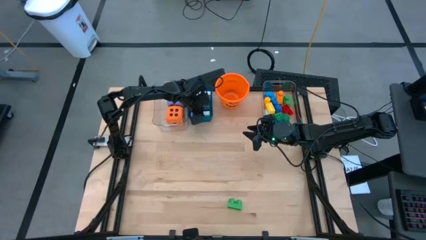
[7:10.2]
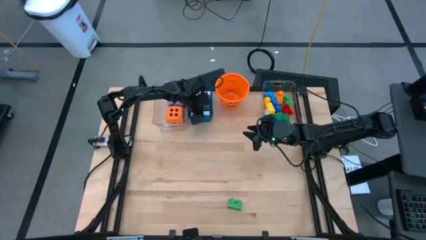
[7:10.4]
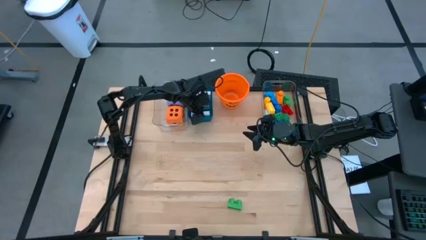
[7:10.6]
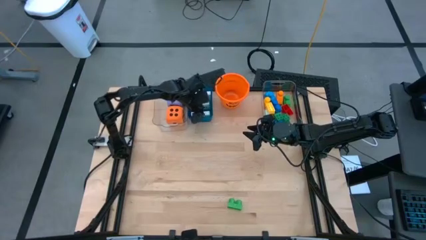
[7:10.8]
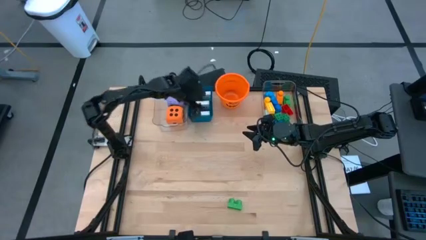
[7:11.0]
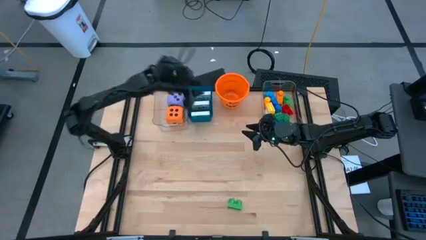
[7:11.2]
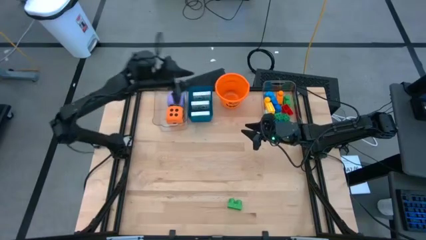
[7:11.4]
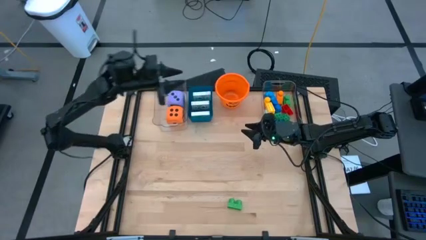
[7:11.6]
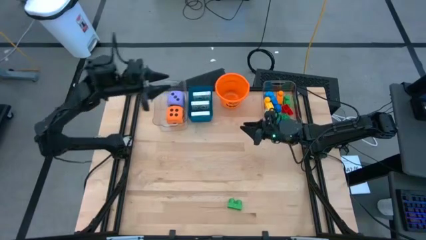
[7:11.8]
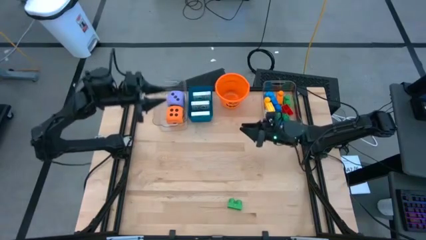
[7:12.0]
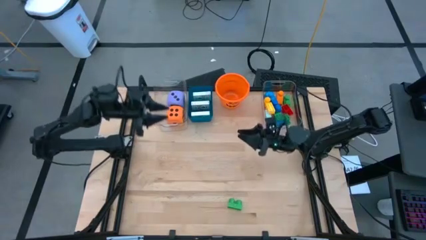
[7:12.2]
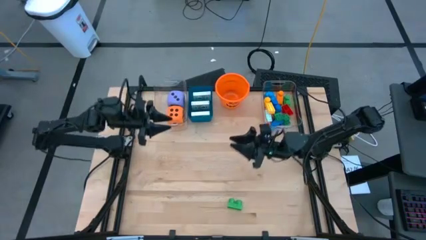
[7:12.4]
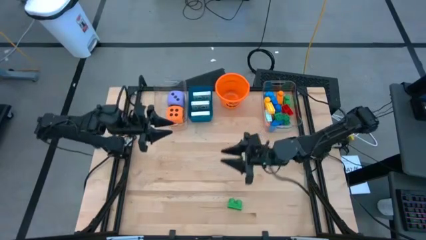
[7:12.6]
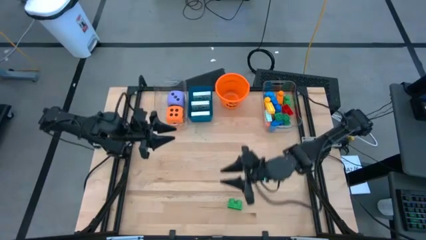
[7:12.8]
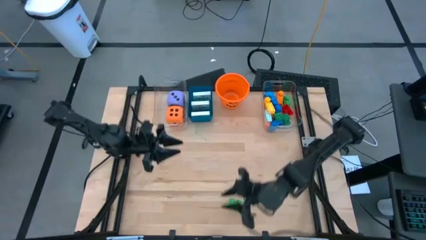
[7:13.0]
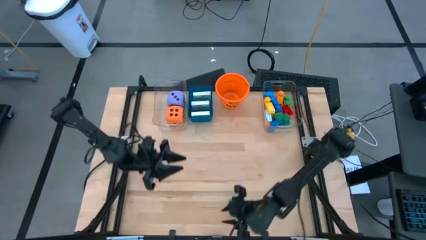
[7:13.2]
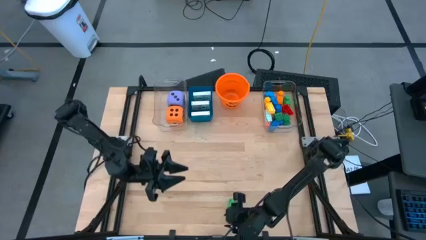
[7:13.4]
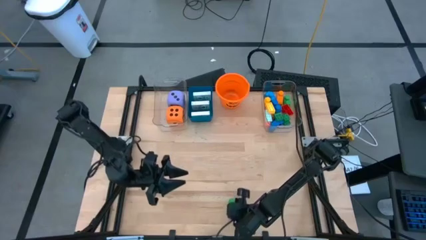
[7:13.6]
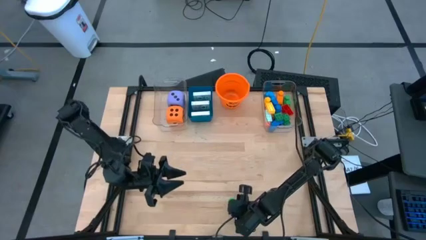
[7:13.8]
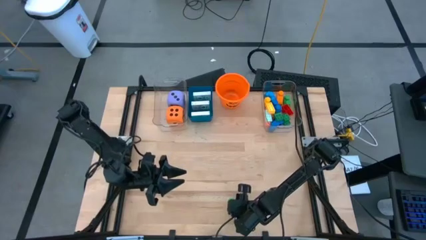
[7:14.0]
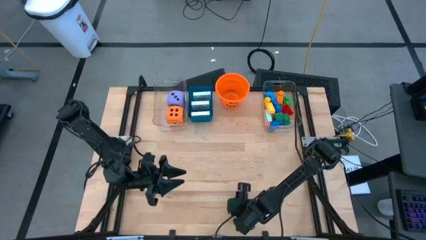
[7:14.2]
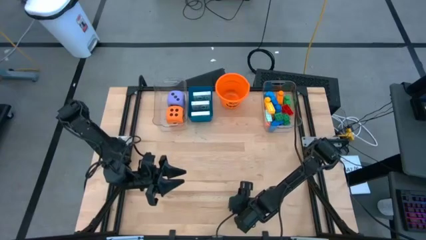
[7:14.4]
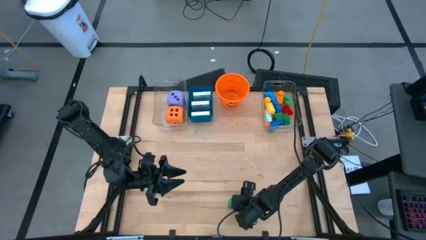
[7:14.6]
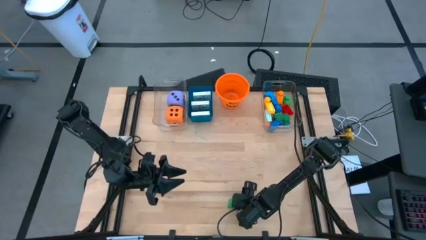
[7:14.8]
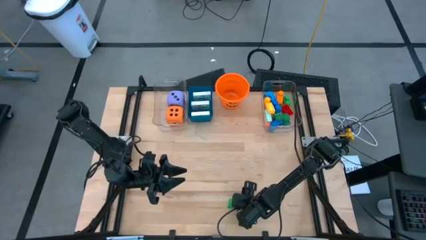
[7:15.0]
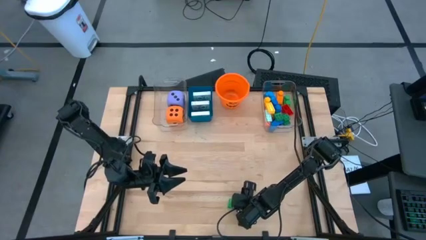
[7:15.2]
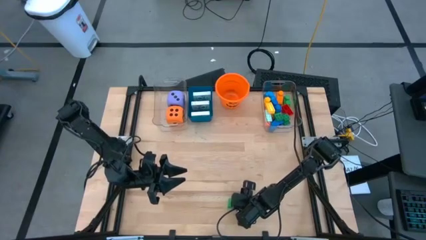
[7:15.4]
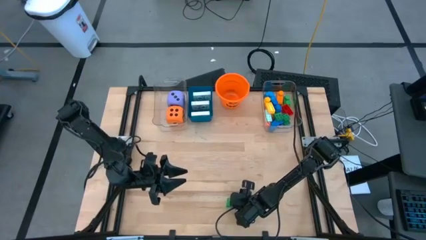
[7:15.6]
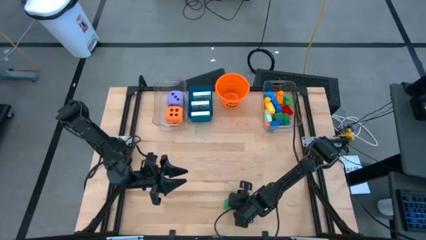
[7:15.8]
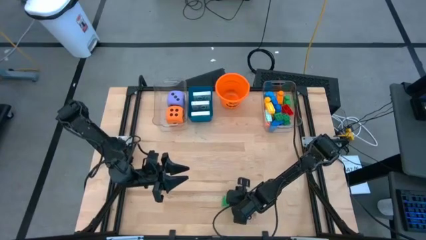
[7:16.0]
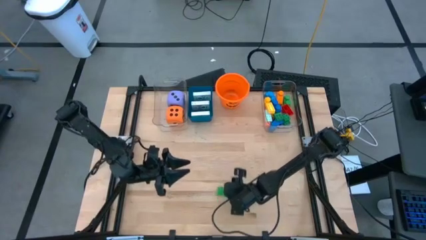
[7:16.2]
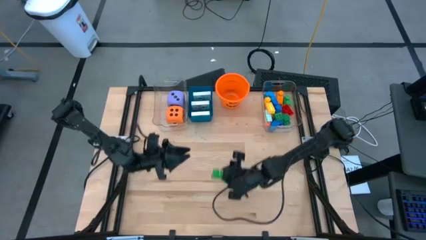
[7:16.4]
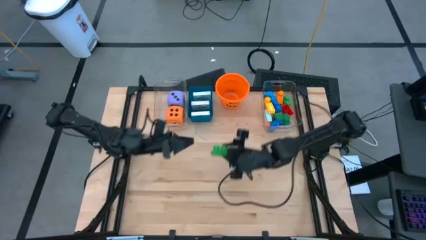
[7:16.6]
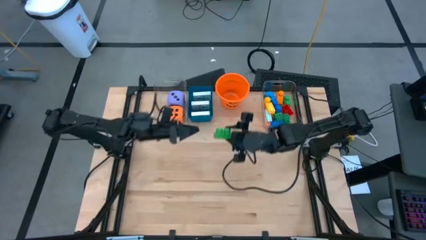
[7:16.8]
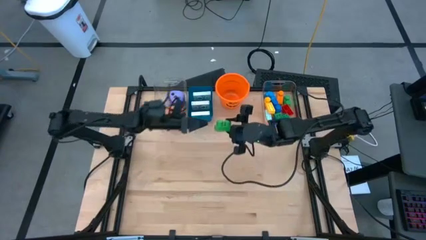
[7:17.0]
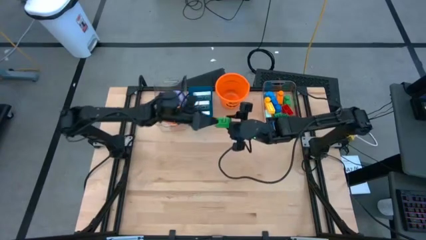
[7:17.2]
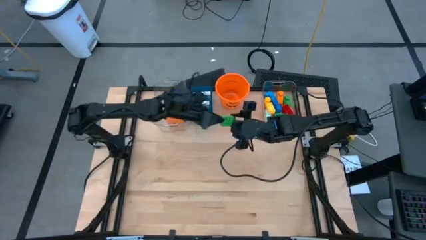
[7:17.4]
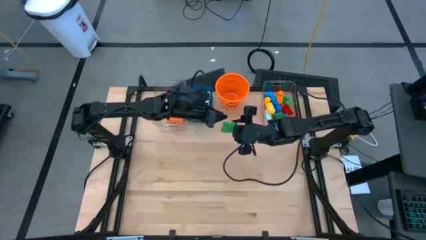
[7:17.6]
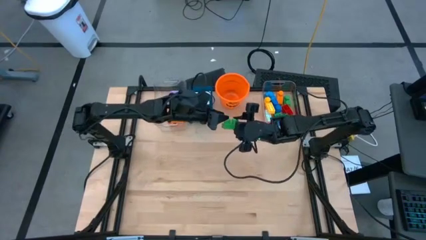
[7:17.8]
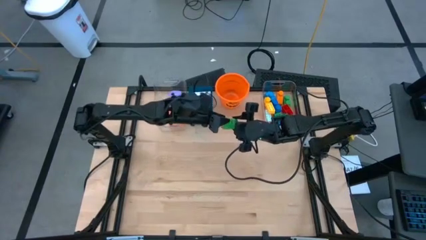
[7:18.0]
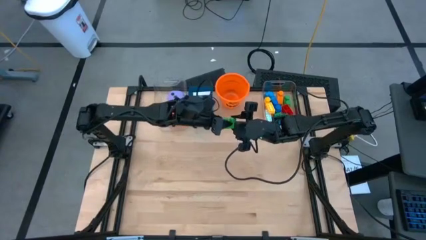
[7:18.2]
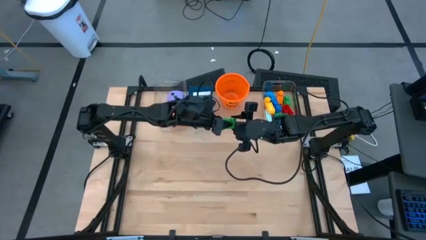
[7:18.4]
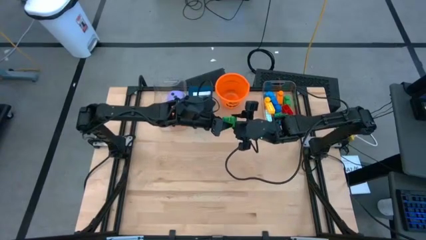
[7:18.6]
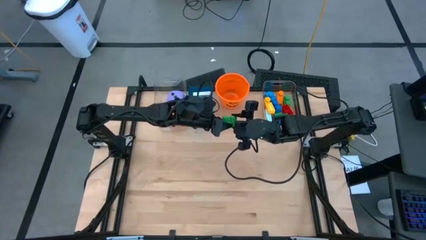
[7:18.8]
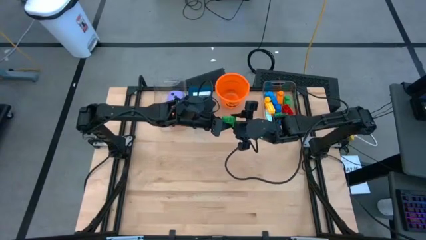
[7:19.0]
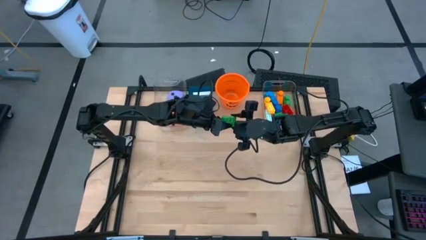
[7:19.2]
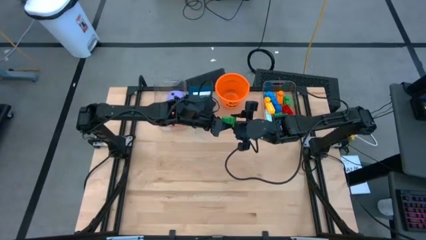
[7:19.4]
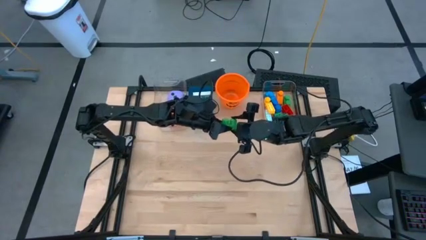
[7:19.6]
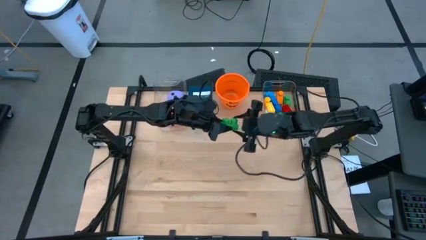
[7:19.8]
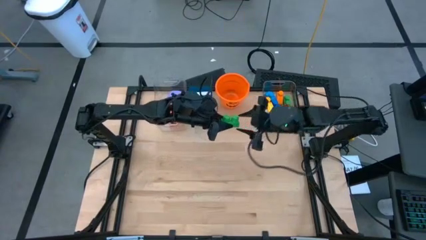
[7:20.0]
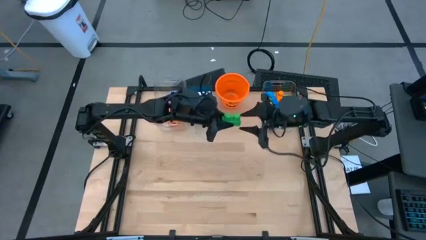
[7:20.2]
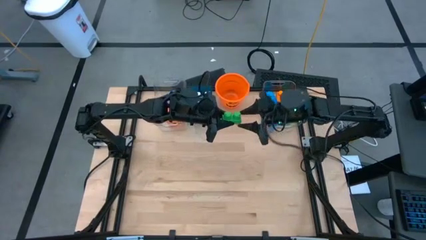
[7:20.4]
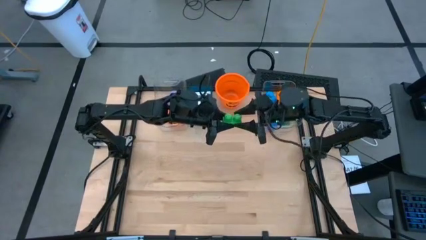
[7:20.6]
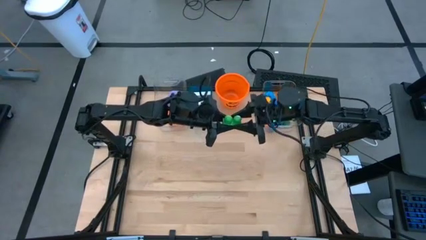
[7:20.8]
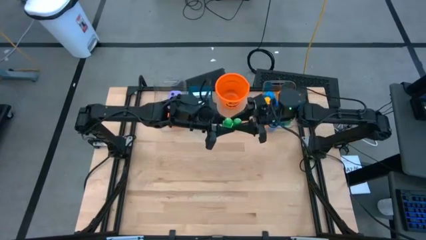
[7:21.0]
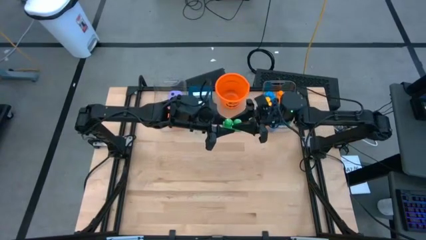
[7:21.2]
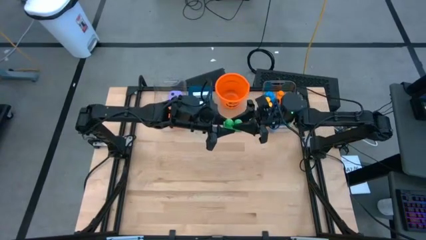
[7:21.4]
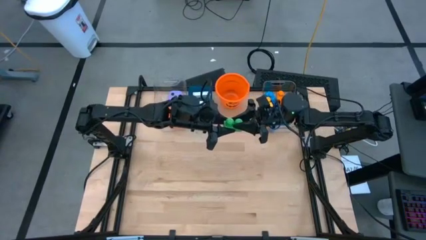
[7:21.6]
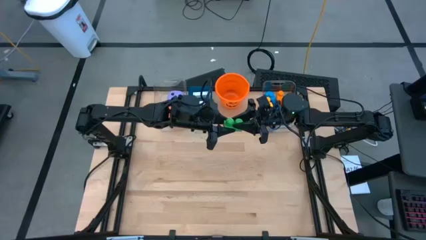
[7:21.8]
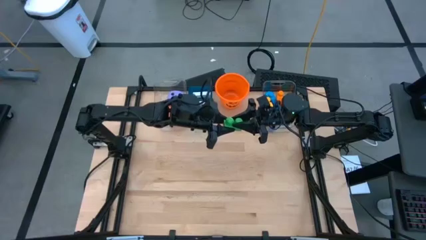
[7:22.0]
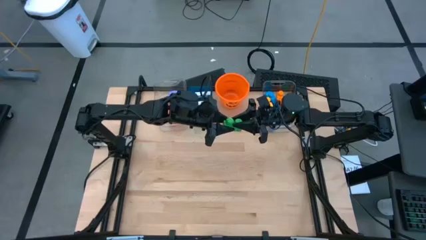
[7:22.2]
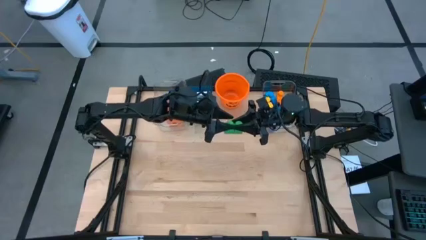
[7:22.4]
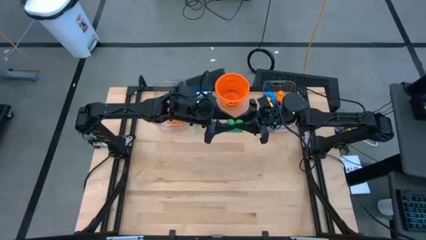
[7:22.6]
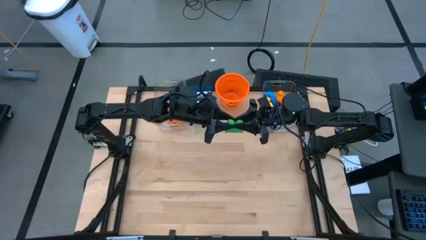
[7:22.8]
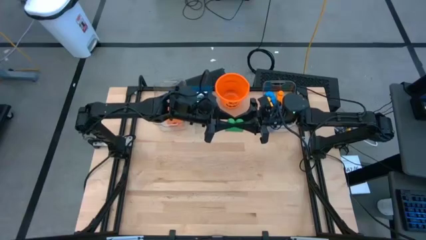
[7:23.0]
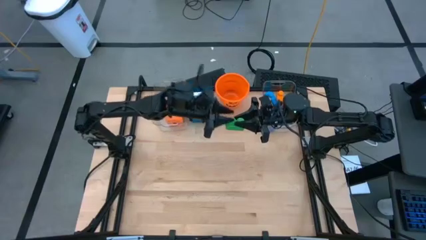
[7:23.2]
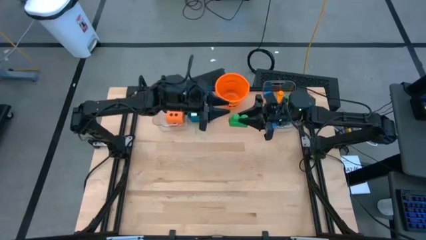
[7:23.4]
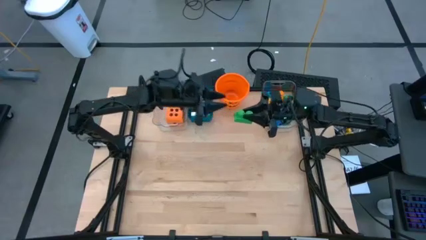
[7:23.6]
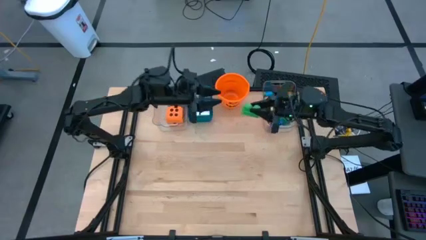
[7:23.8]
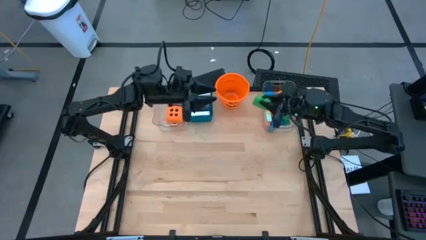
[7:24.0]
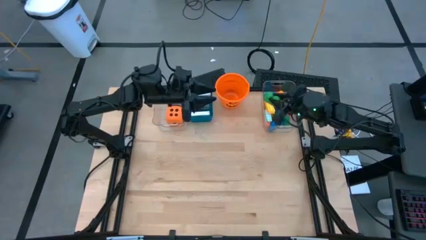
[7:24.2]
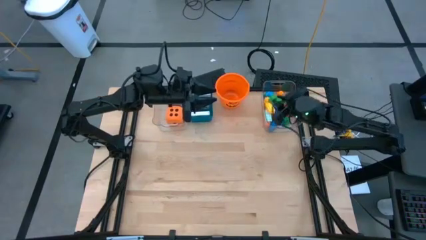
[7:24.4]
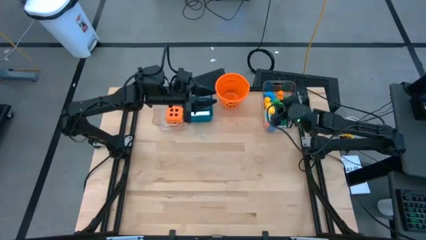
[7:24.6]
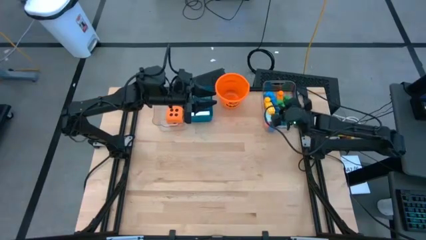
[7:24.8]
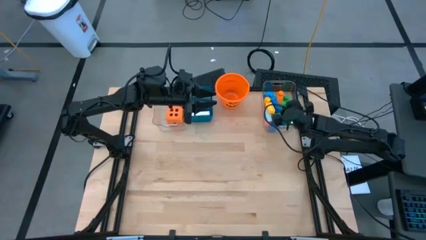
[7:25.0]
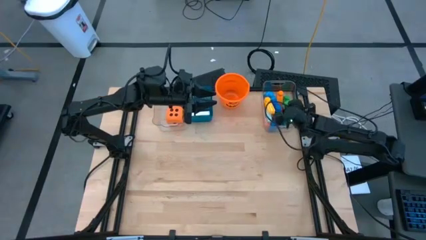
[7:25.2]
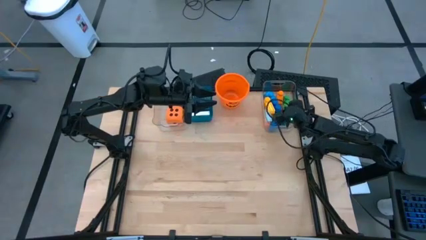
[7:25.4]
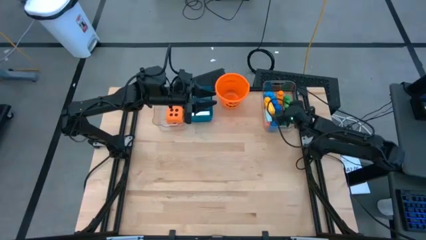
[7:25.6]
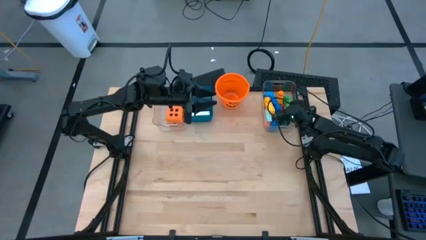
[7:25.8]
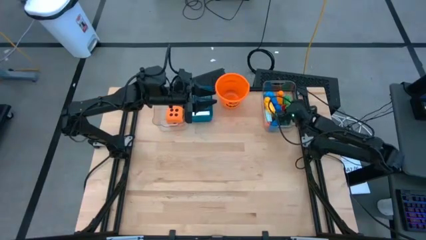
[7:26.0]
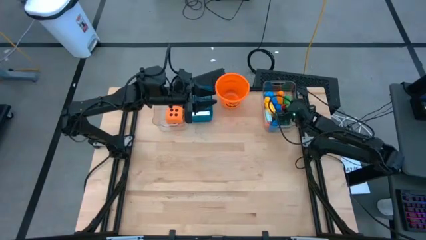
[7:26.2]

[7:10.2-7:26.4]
Task: Pick & Place Toys
Put the green game piece into the right transparent bin
